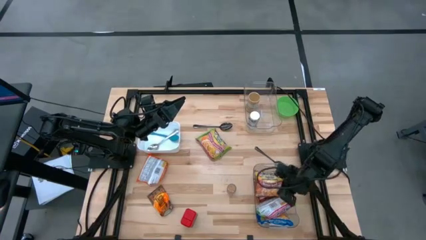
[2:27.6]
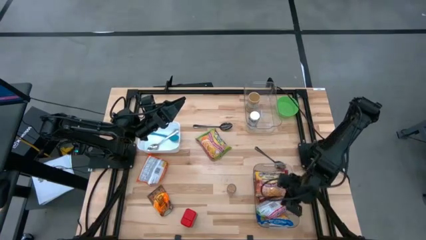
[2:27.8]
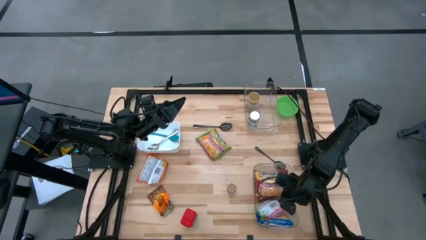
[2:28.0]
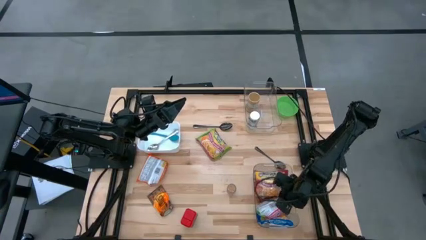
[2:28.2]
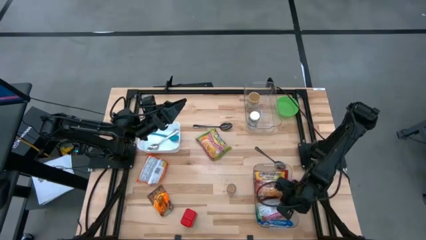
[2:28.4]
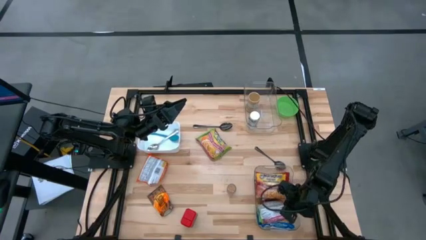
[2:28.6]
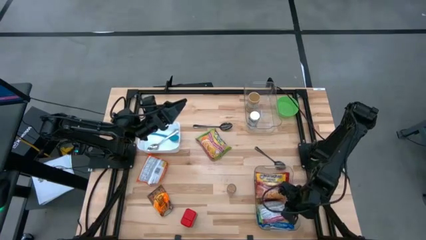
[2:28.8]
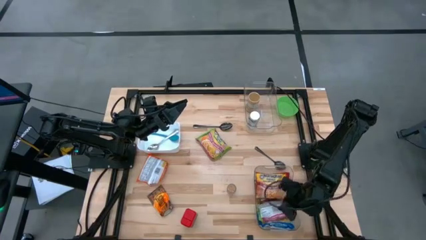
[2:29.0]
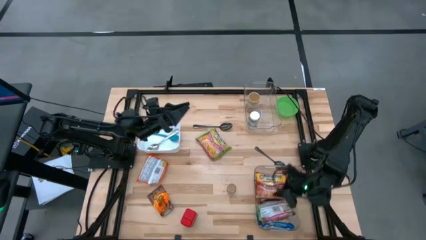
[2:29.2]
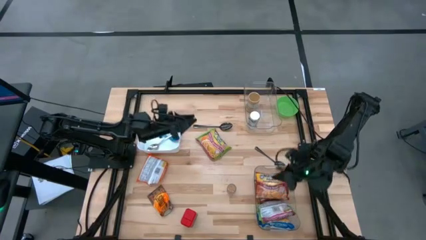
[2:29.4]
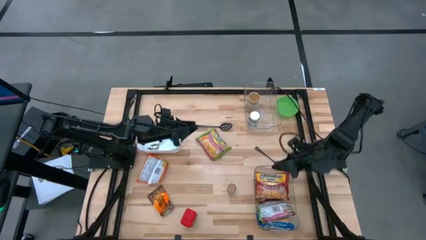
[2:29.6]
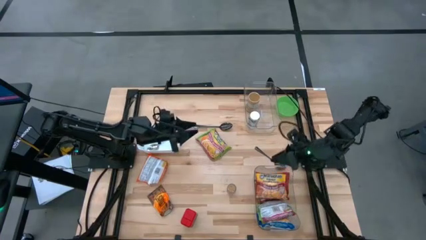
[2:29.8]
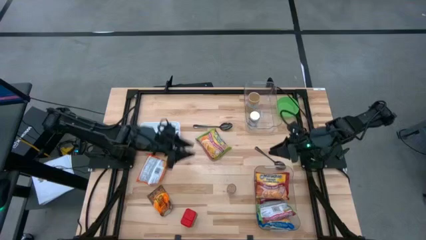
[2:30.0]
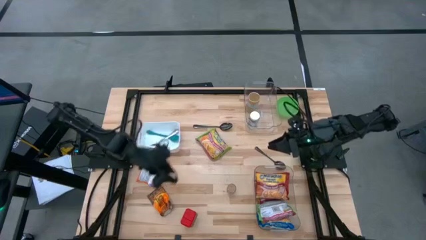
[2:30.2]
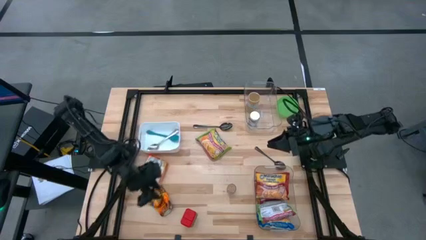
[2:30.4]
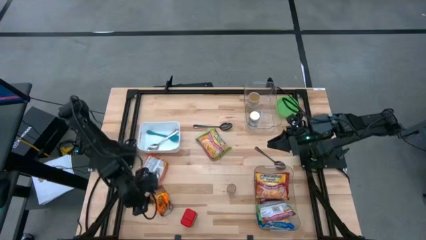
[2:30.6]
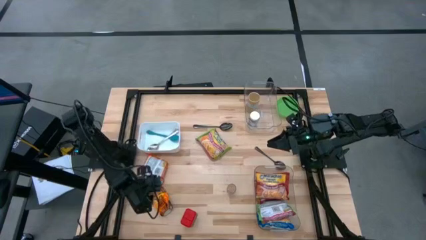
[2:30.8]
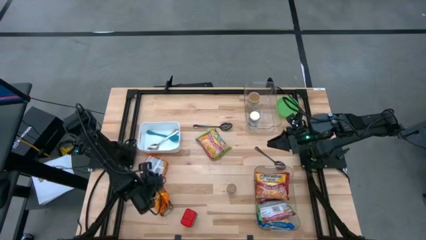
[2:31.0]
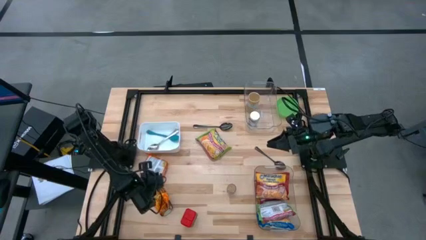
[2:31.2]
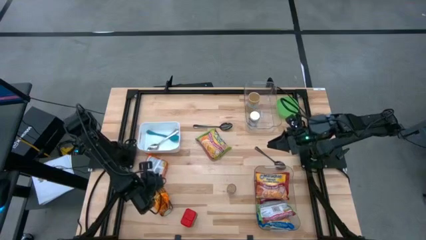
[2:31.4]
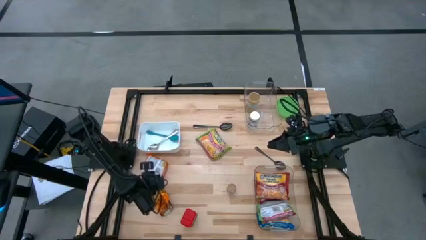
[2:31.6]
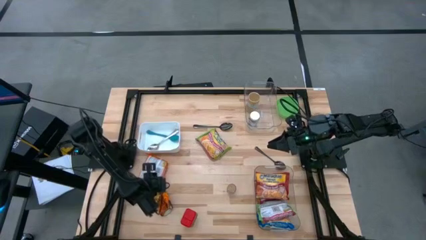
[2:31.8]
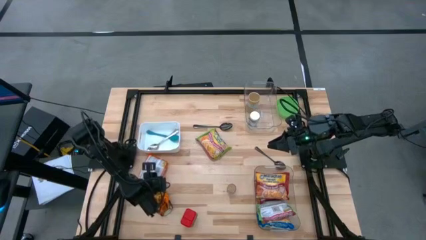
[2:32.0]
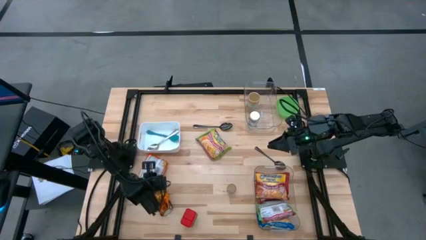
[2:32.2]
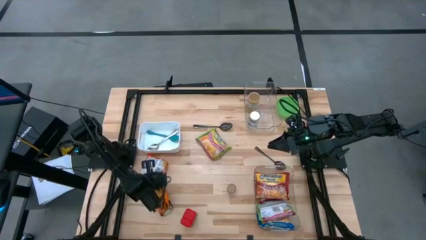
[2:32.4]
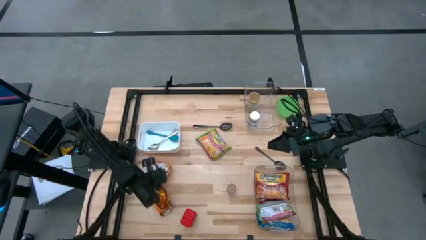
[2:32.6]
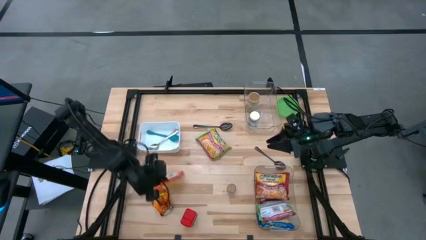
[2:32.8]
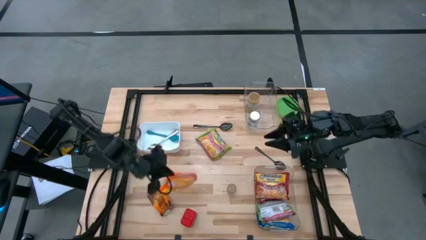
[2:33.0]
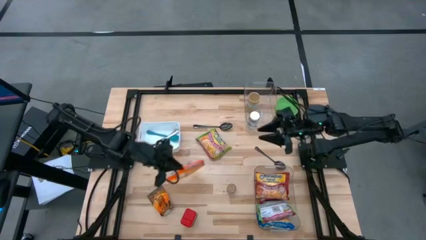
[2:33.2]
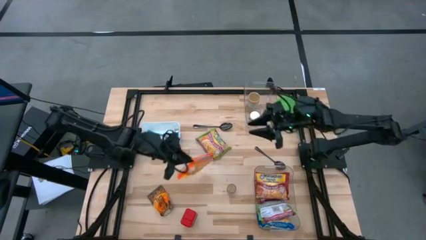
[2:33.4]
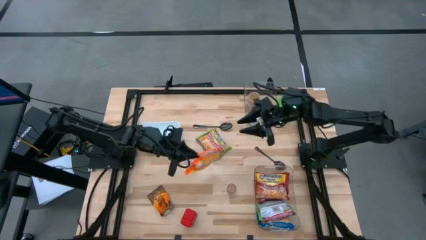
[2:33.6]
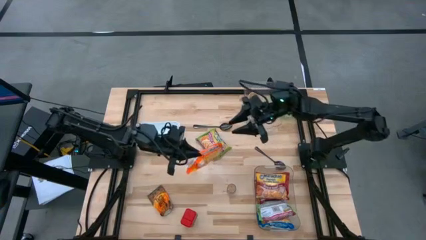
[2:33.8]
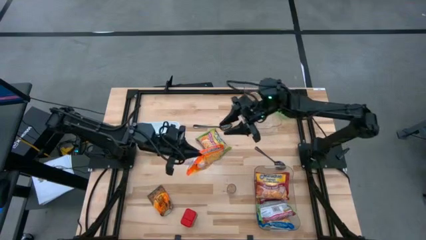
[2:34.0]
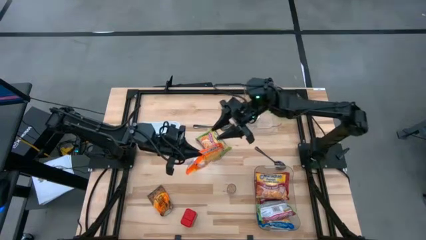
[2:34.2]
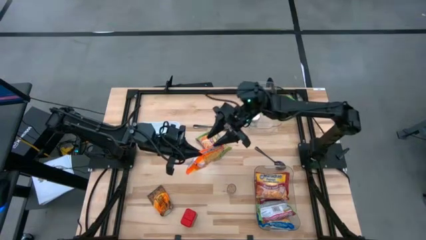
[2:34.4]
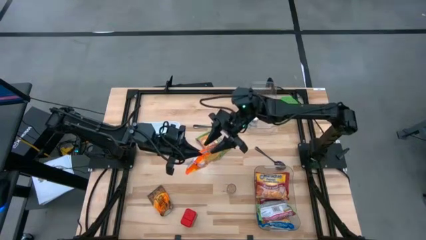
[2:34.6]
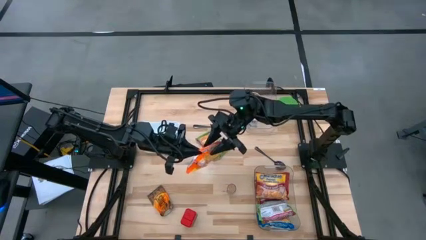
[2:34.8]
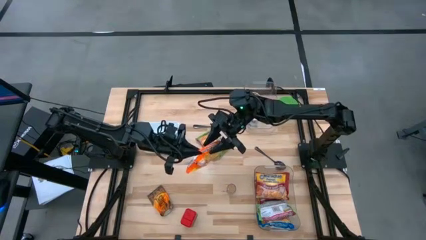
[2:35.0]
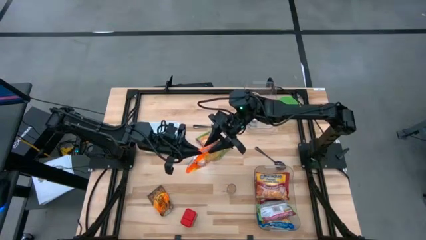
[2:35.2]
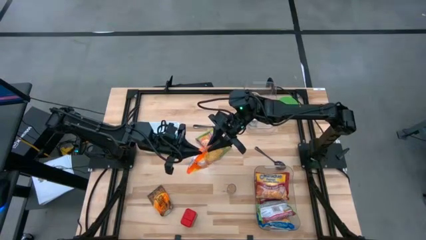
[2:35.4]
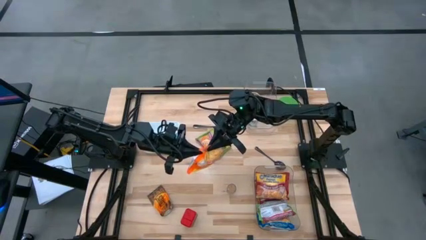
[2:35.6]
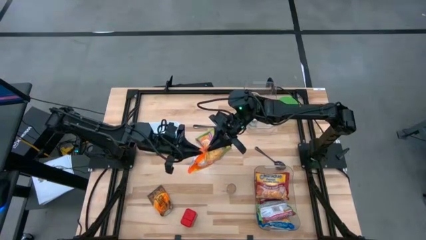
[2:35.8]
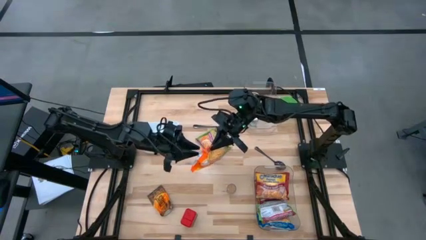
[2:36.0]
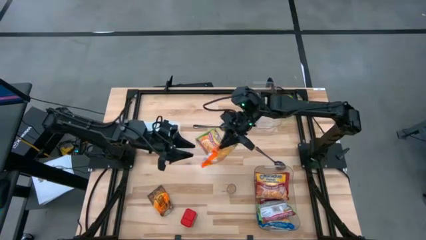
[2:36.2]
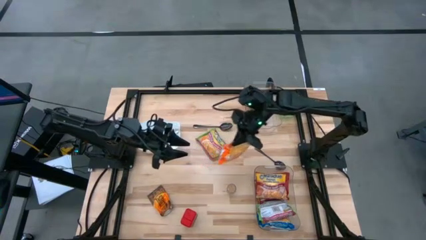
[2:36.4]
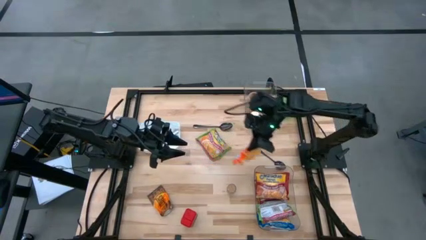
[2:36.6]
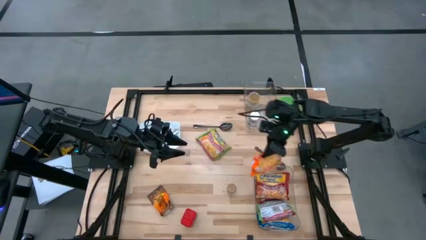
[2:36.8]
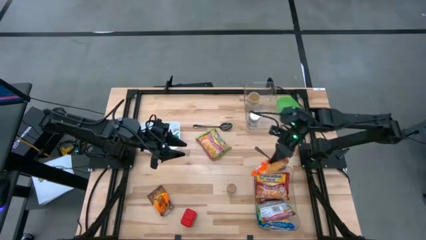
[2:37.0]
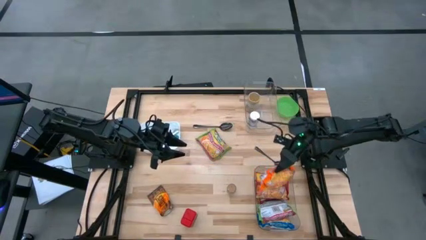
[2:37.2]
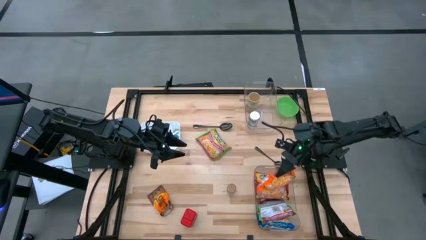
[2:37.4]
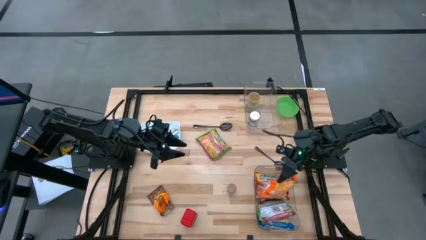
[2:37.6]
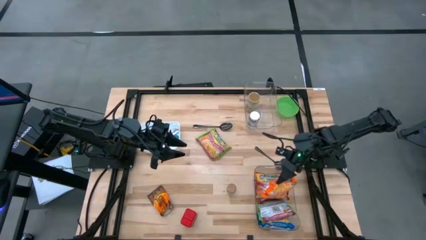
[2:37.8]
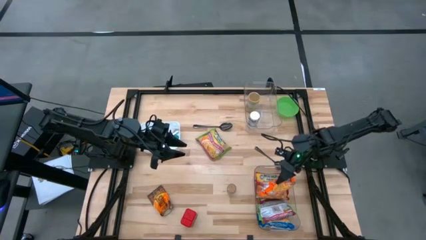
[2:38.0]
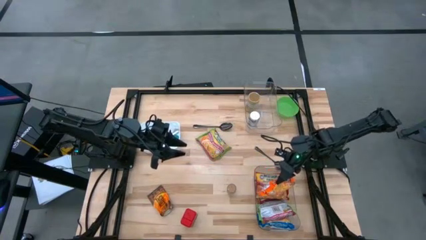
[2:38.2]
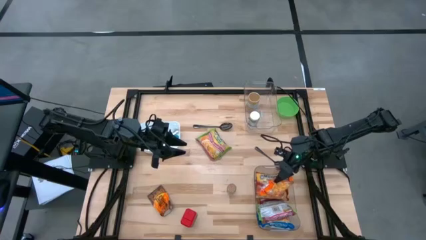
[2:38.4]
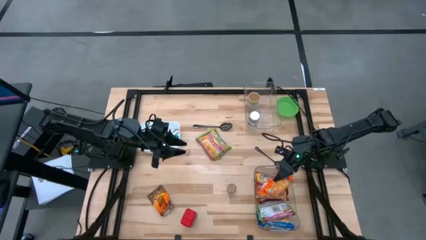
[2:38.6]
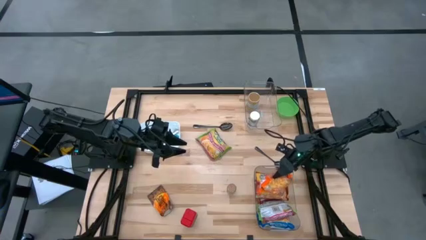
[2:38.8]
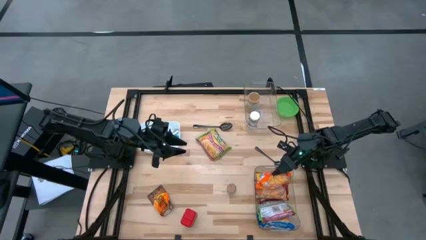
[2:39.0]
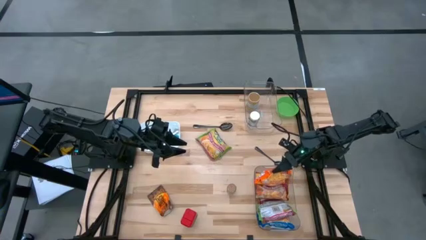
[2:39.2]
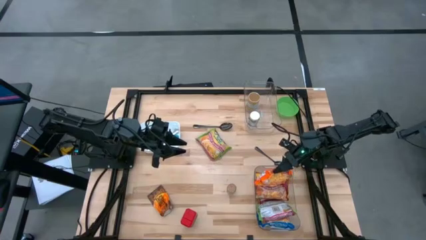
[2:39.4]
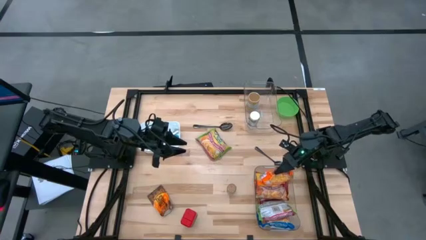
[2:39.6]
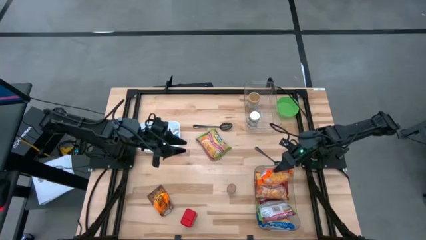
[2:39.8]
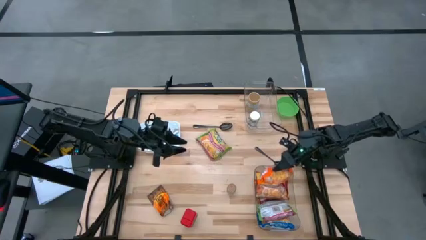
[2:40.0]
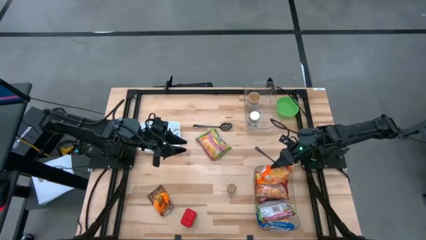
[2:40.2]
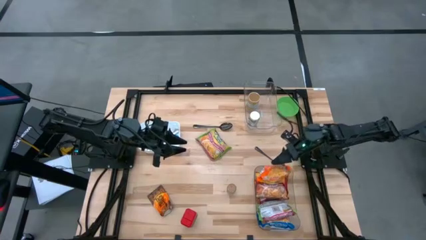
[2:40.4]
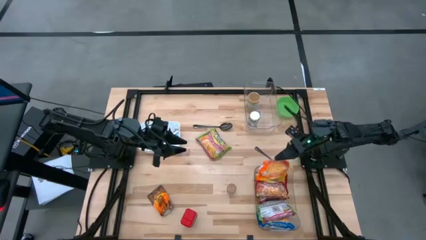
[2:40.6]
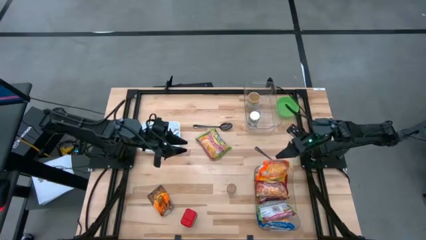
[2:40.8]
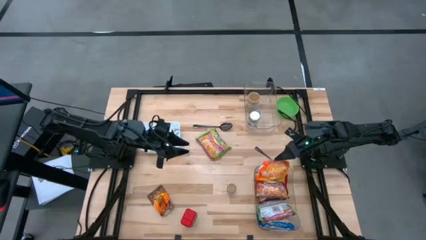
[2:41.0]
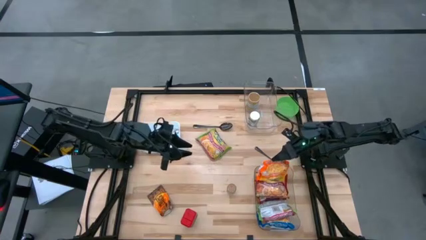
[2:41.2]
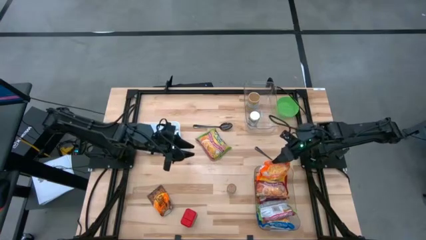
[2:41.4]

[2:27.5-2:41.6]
Task: Pick & Place Food Item
Put the orange noodle pack into the bottom transparent bin

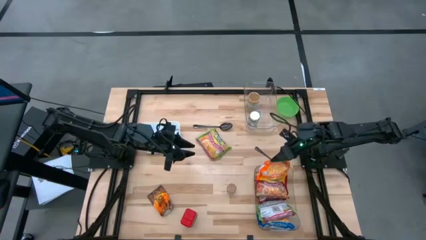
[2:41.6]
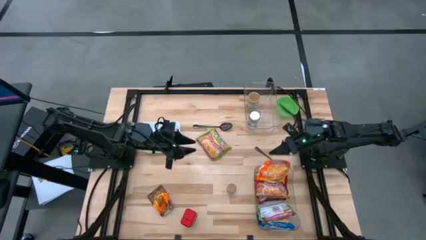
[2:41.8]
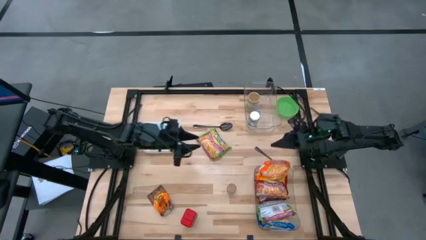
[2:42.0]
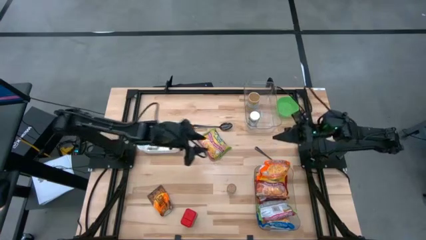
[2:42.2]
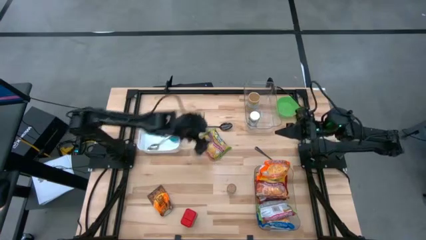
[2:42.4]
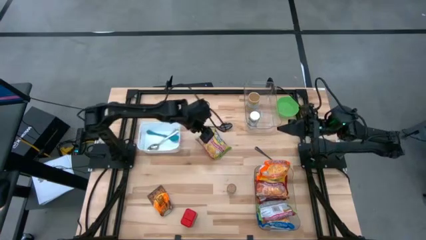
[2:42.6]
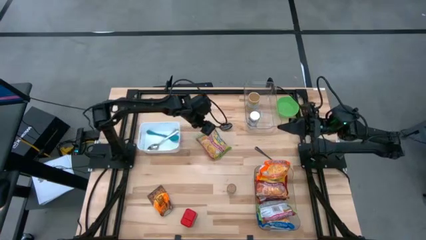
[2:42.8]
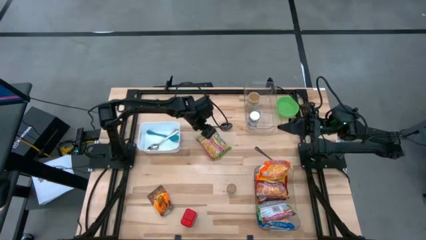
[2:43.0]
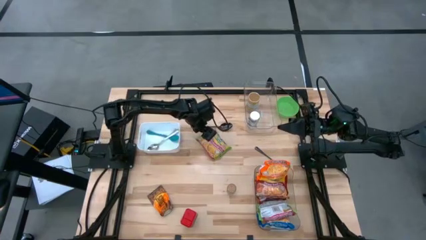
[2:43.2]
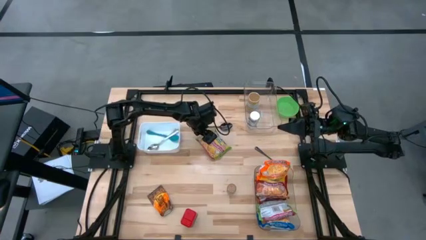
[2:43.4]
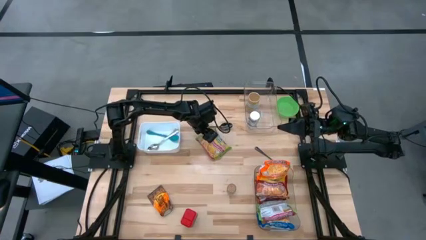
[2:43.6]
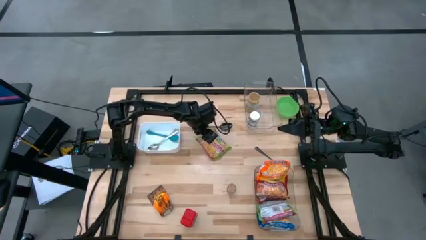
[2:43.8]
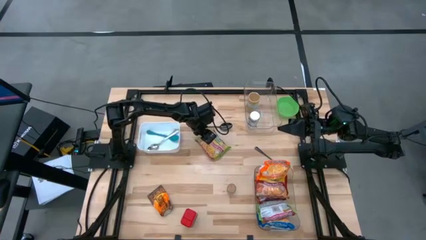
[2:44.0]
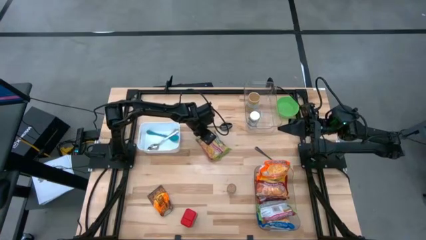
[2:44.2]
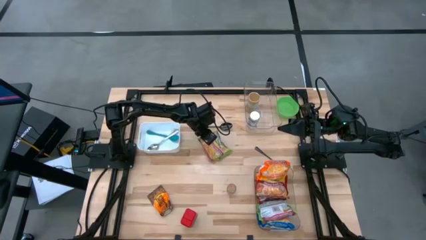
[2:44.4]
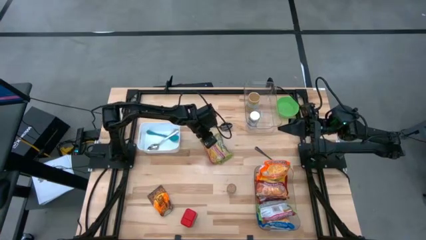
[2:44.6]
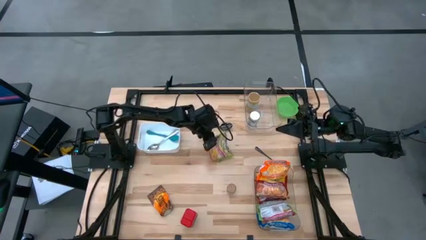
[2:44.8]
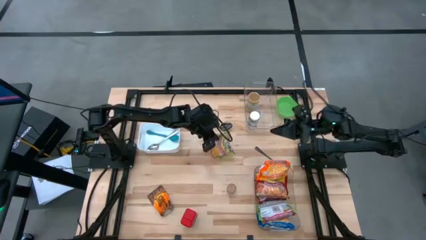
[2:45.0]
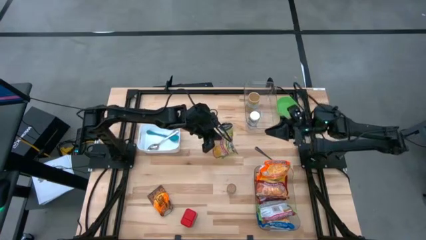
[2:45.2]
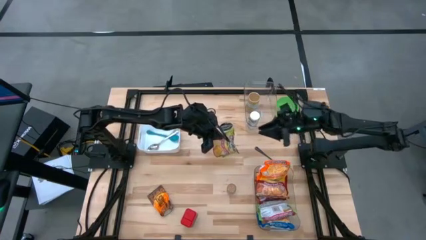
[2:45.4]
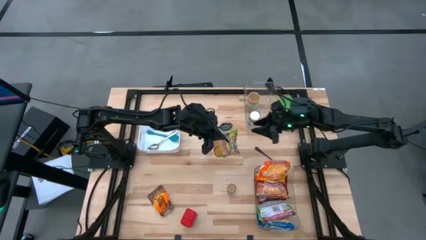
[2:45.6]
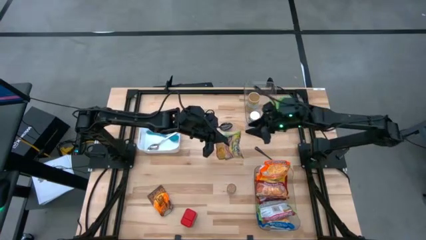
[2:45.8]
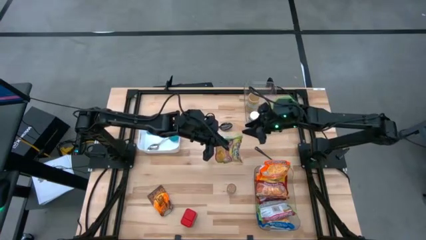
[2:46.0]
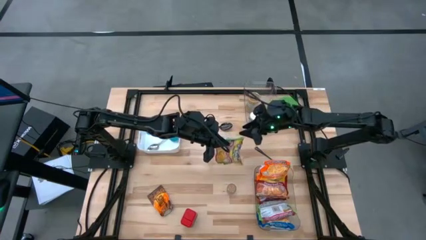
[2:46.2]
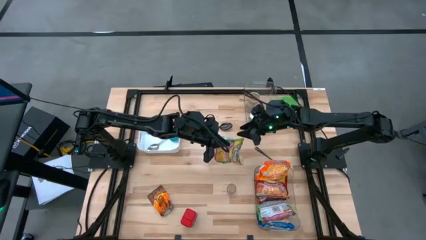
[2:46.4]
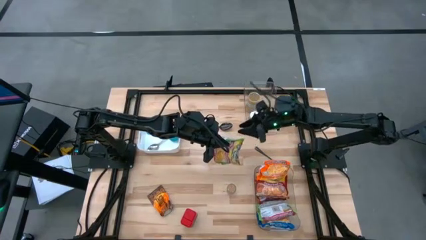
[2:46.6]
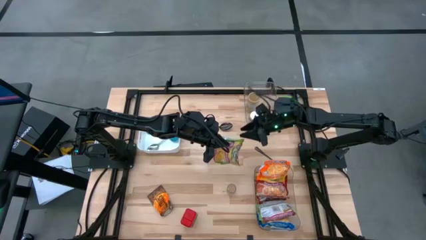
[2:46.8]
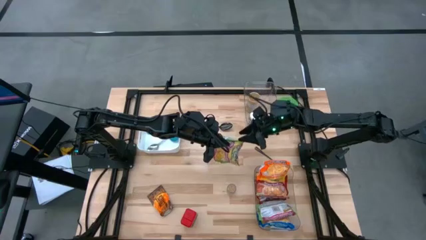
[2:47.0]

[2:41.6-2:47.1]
Put the green noodle pack into the bottom transparent bin
